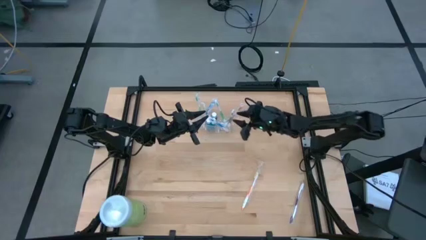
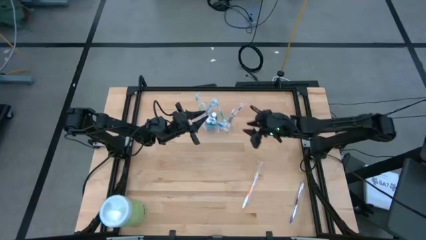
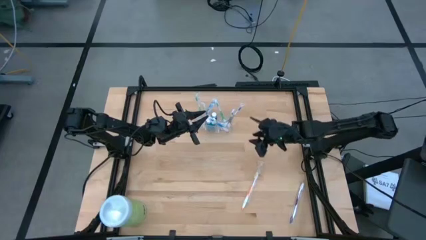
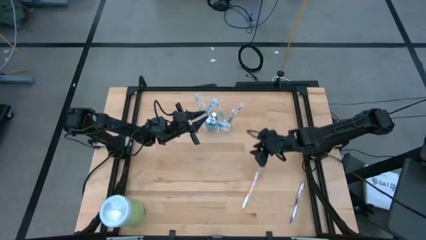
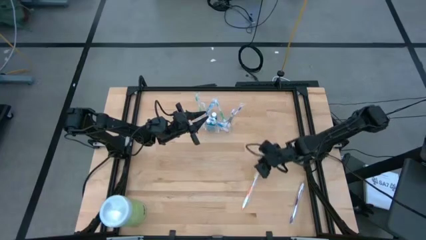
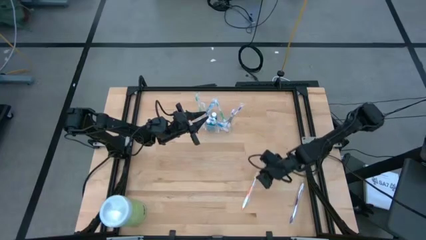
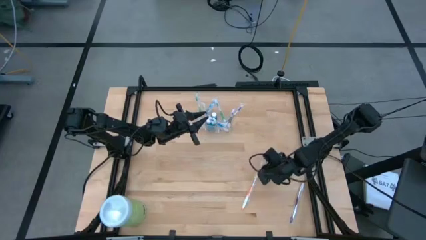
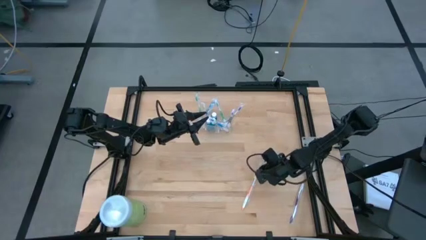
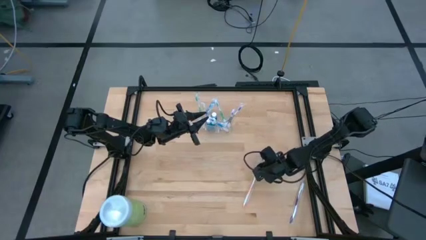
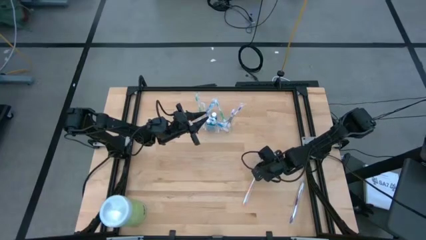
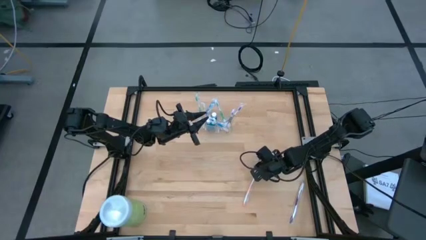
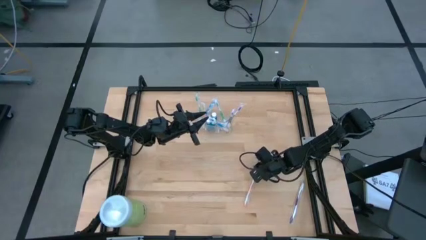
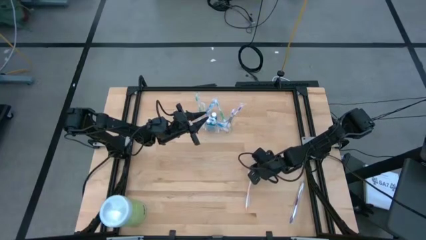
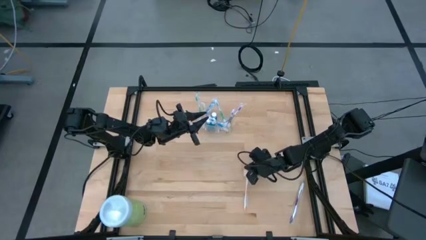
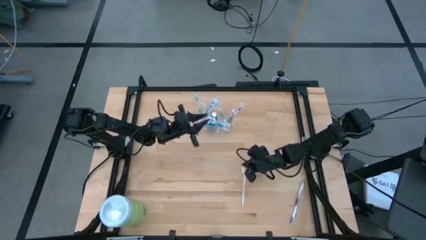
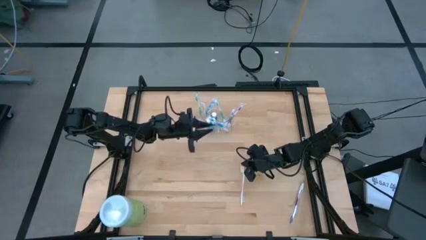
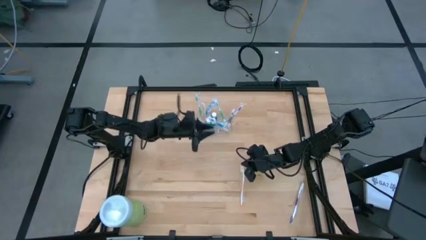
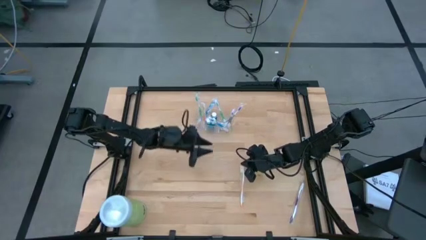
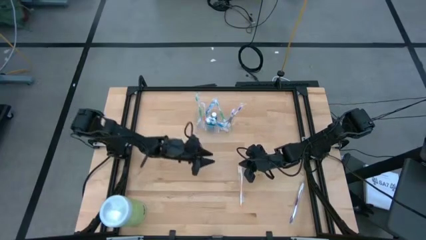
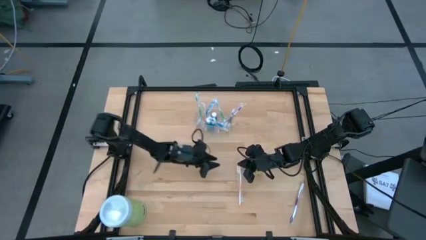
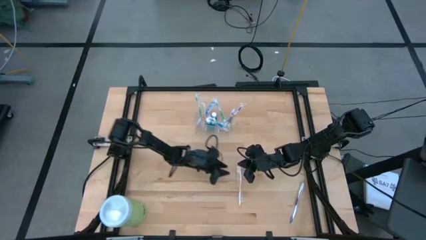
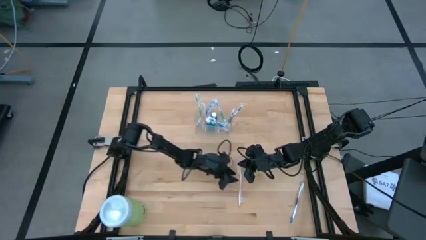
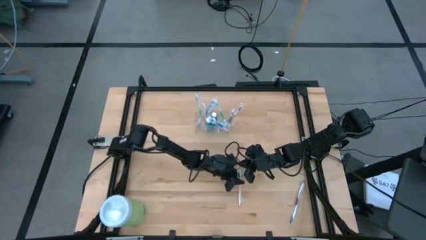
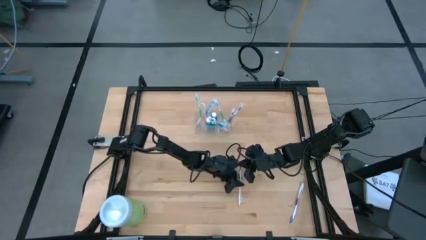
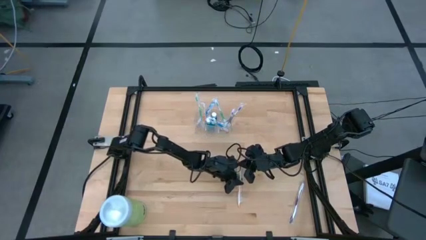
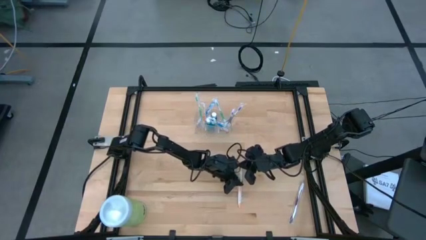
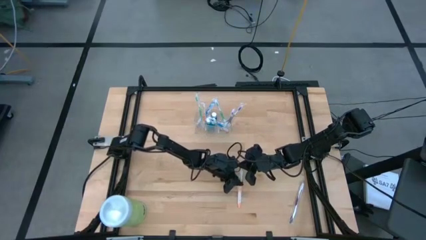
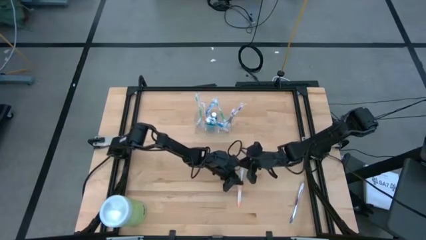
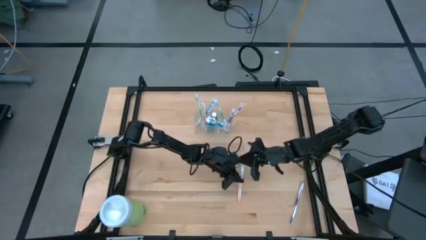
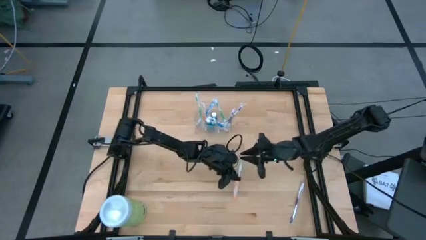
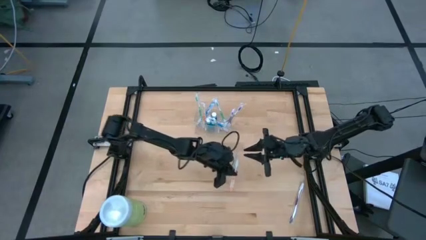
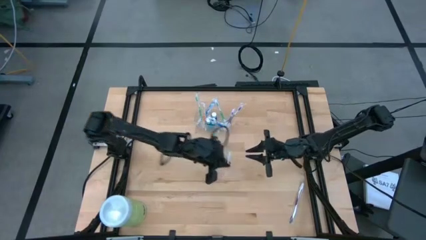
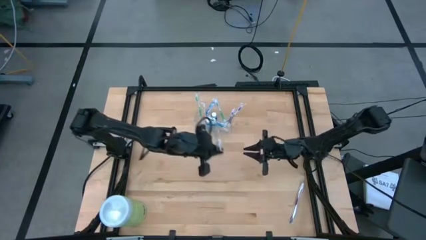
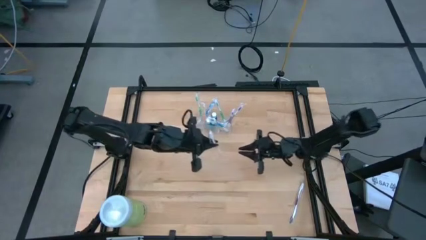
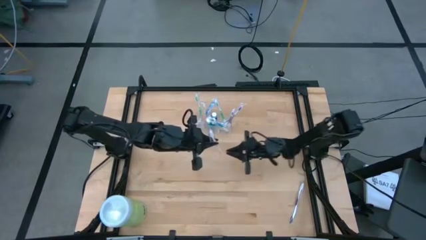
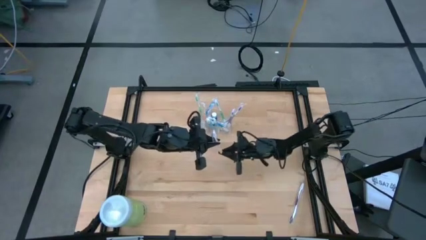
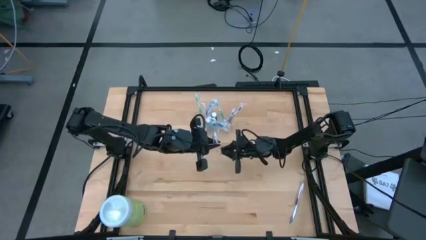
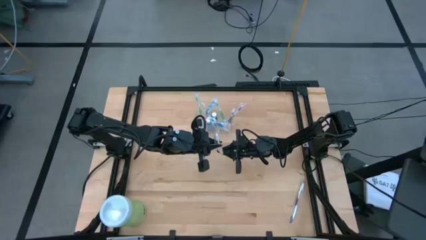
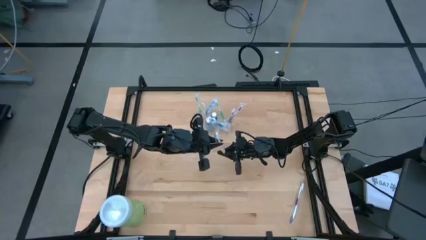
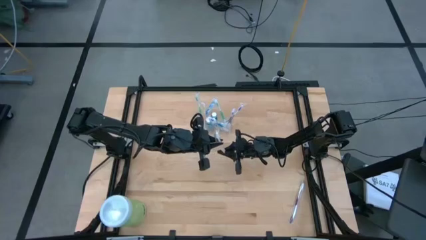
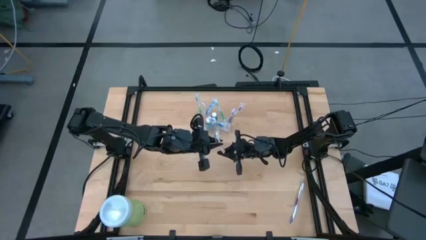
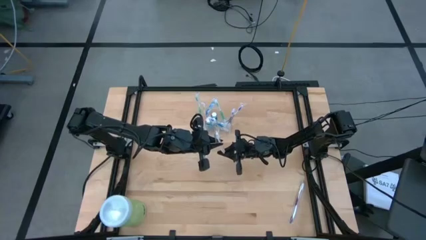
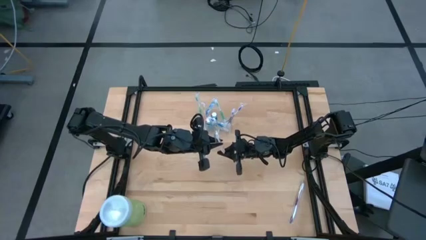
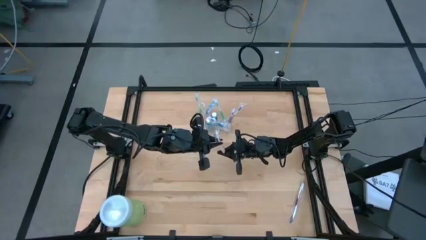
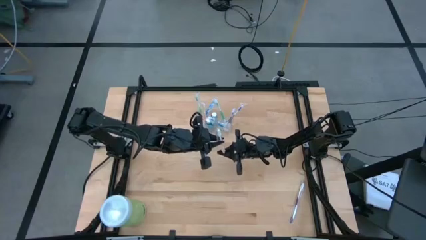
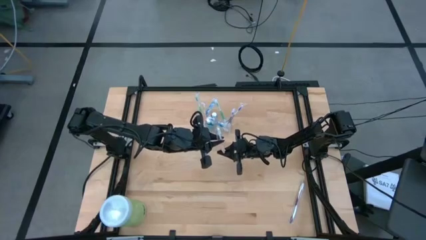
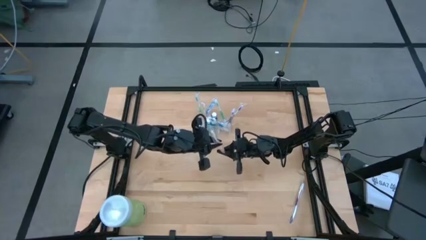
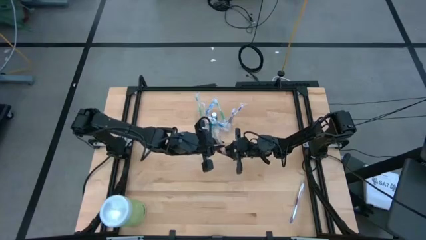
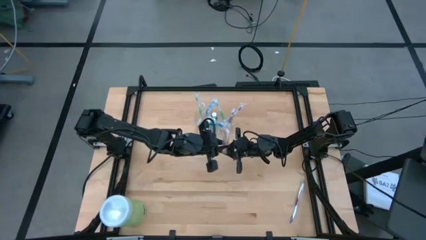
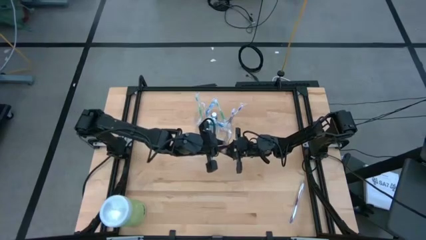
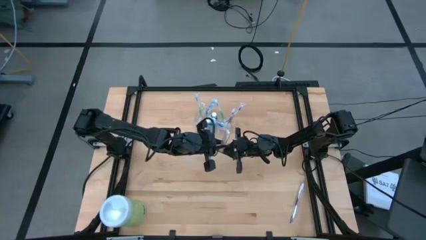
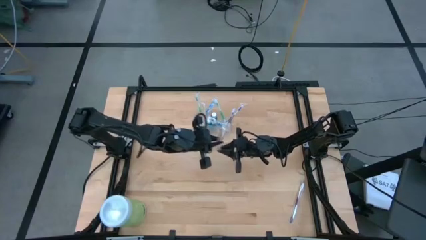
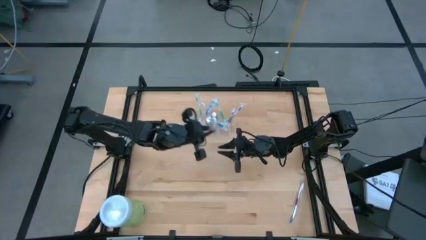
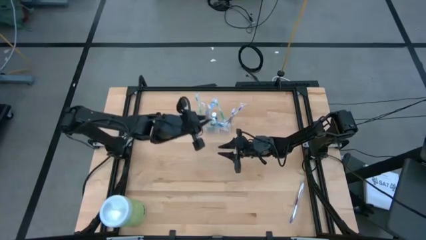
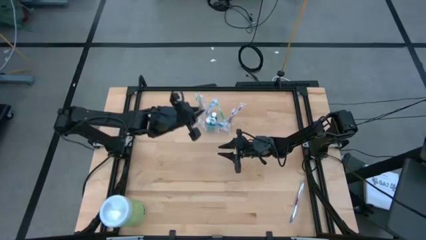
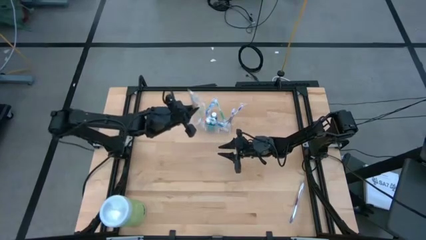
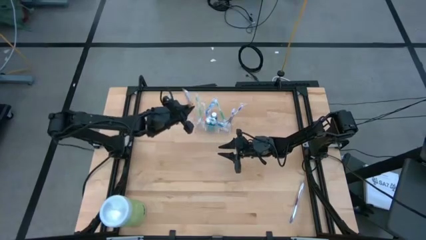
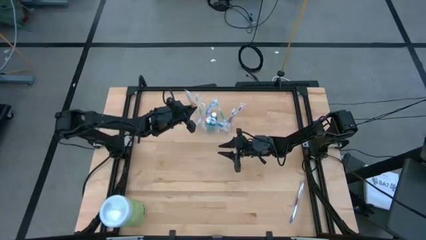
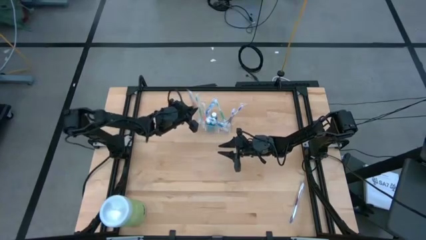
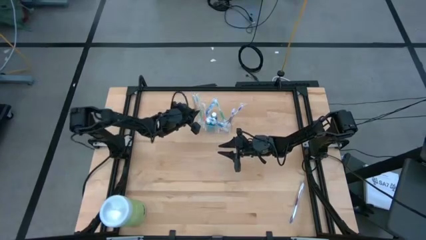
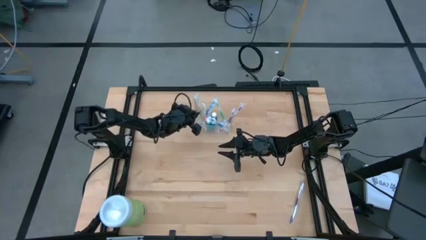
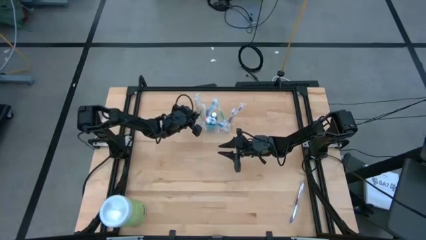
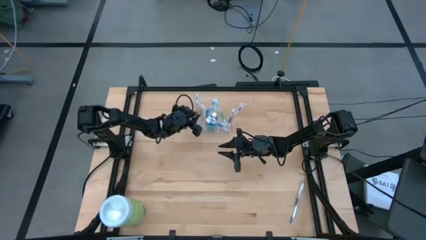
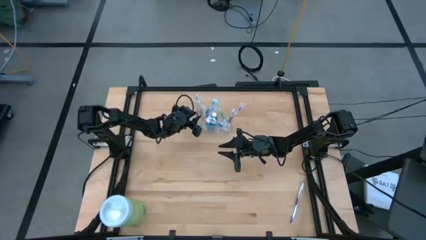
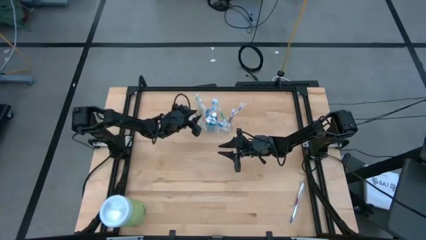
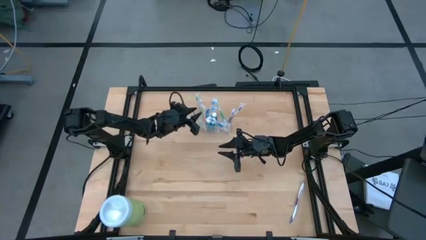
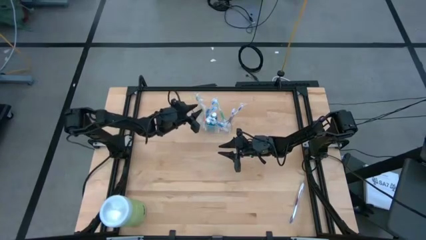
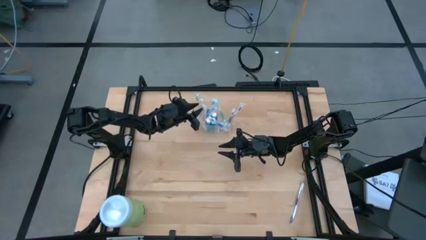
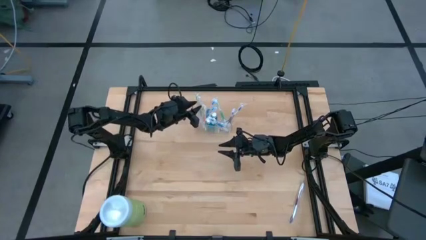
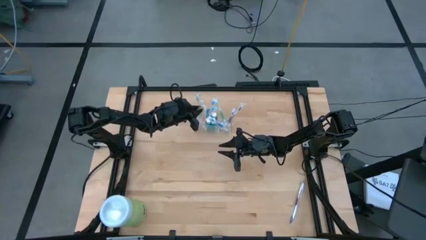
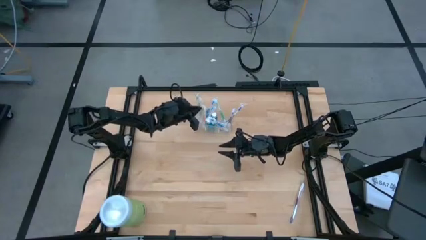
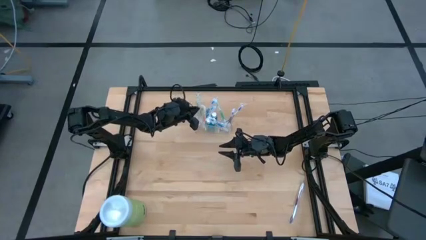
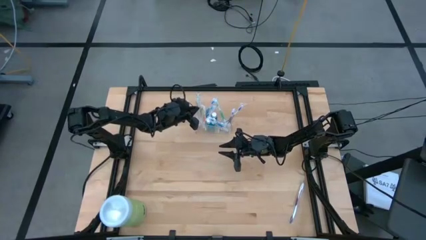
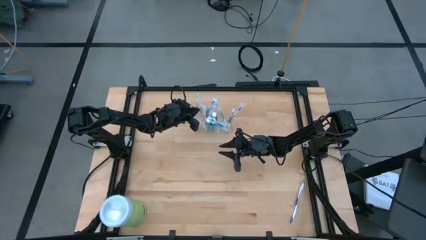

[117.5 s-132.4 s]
Task: Pick & Place toothbrushing station
Put the orange toothbrush into the left section of the transparent organizer
